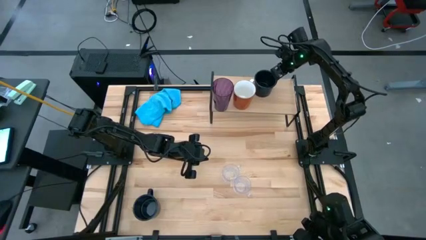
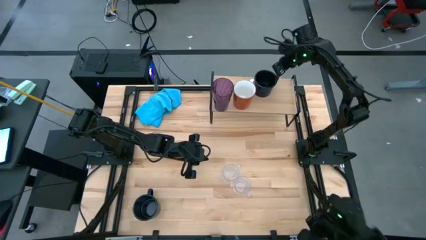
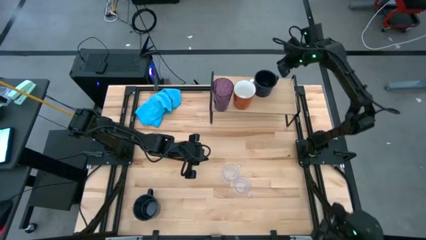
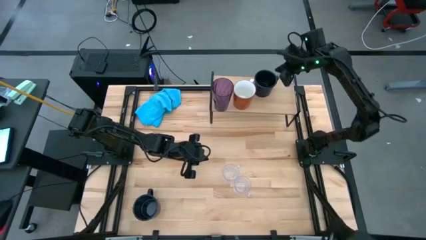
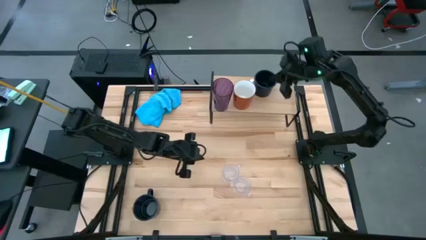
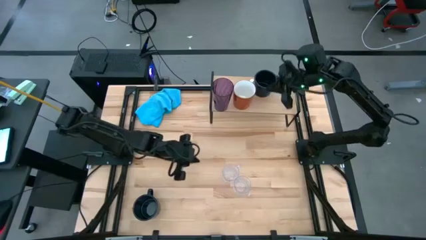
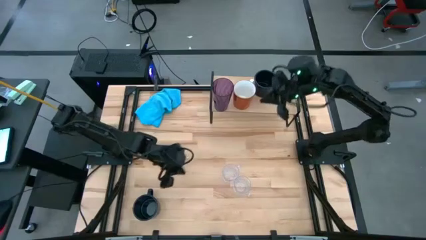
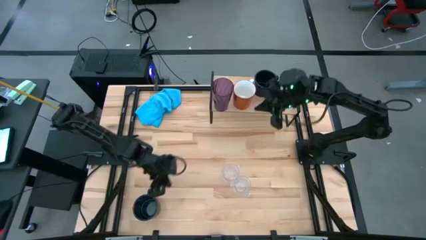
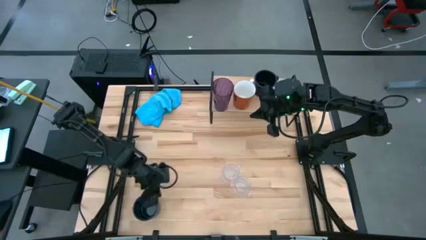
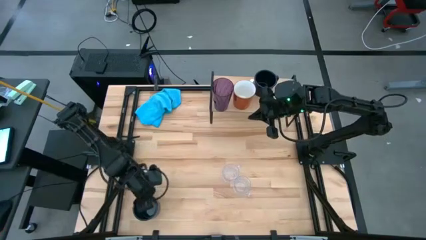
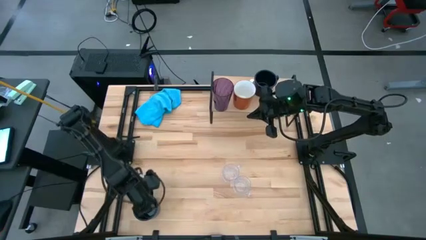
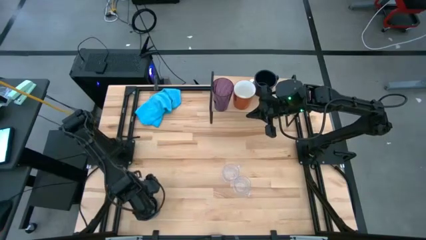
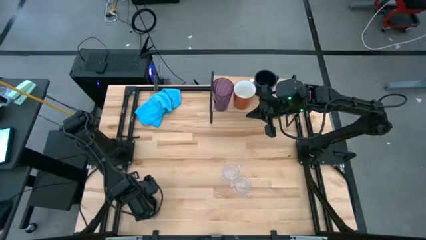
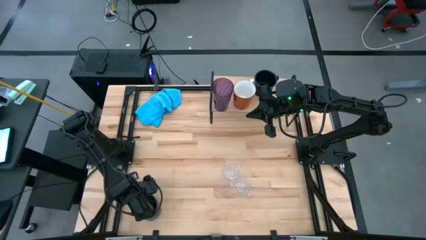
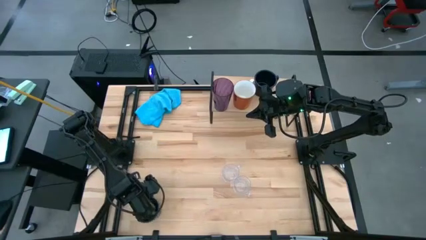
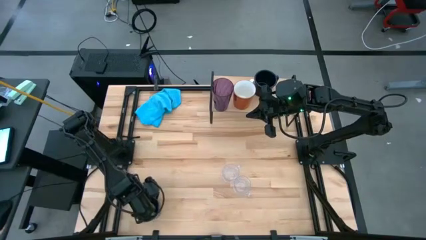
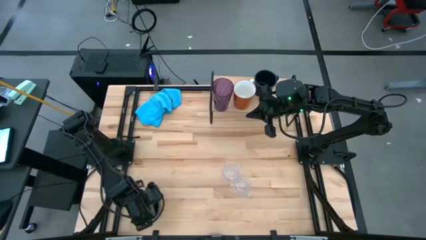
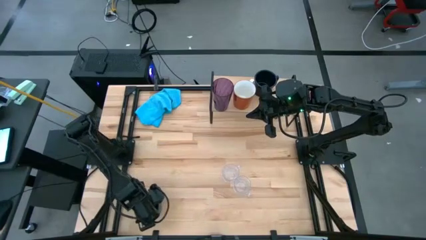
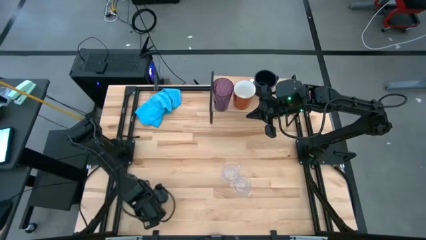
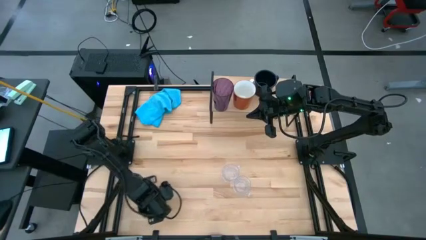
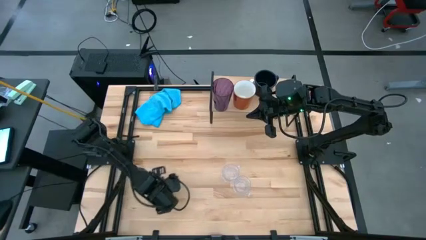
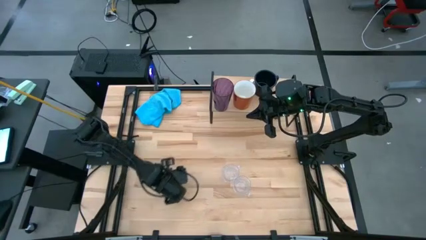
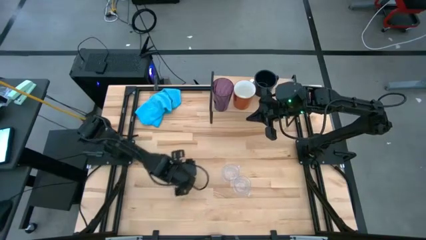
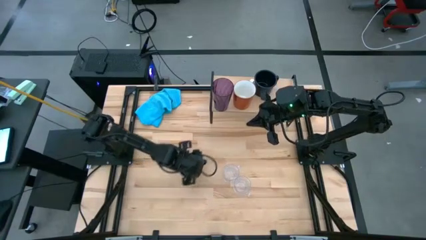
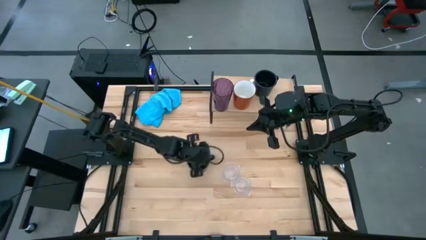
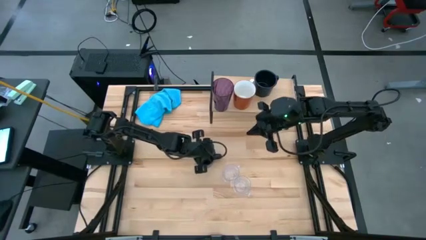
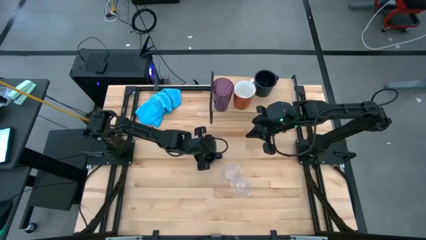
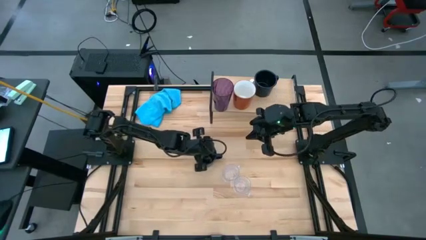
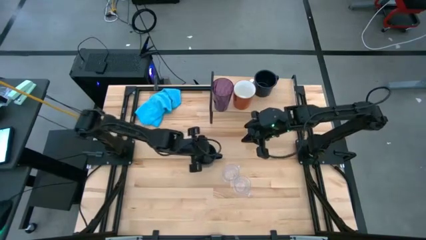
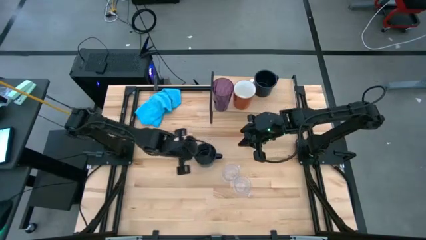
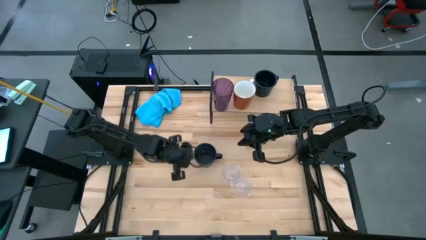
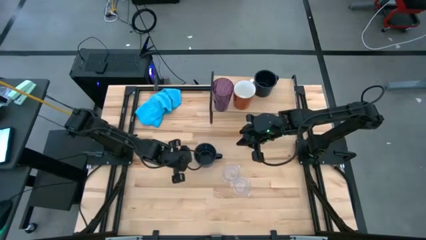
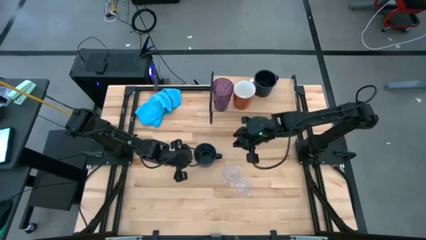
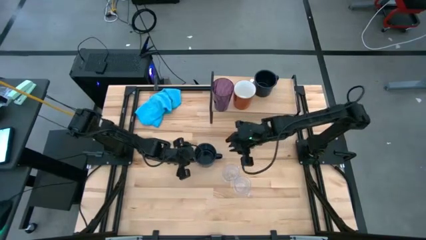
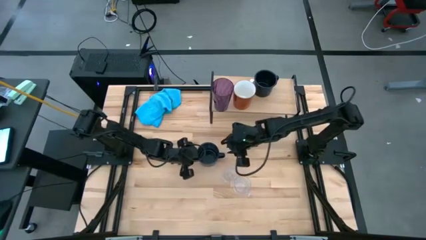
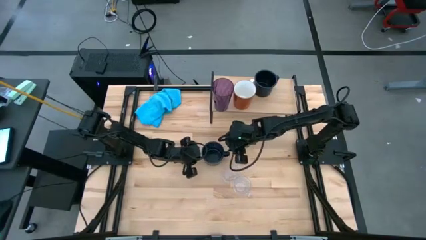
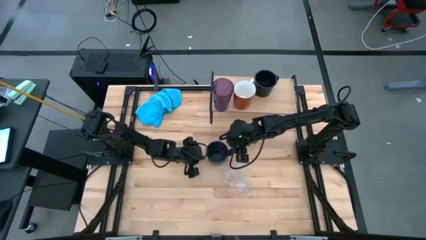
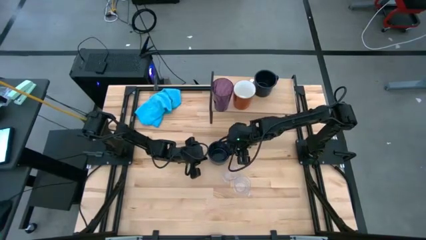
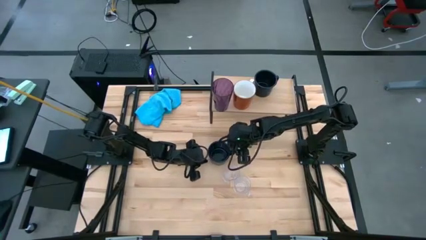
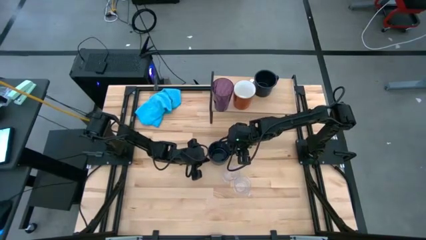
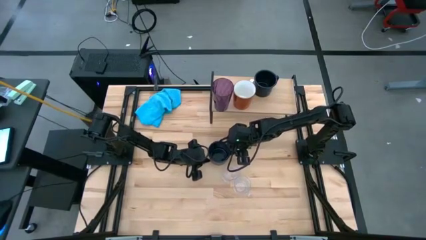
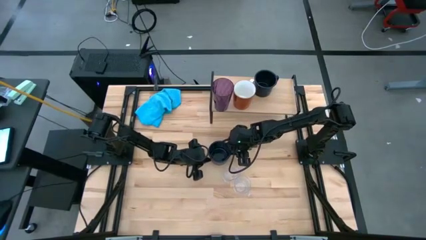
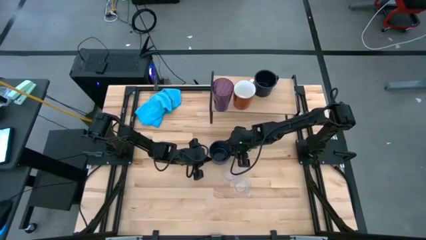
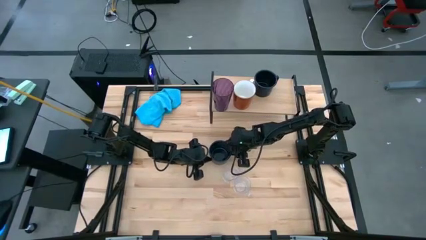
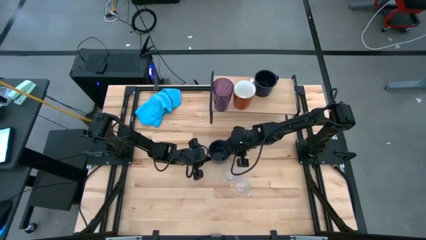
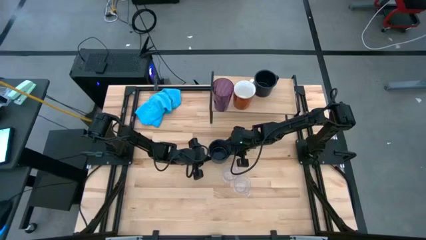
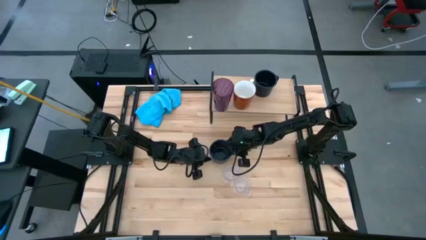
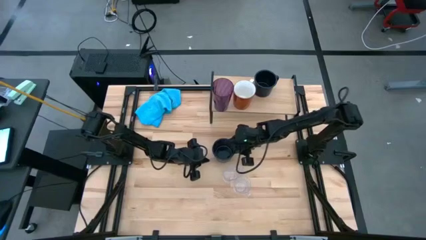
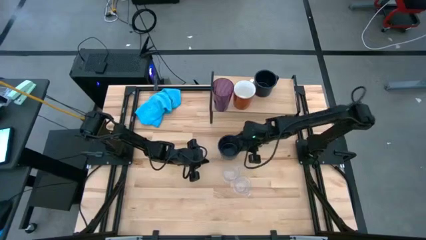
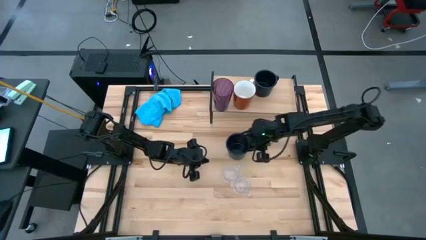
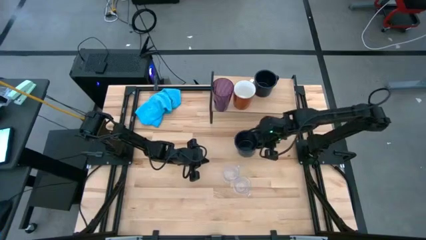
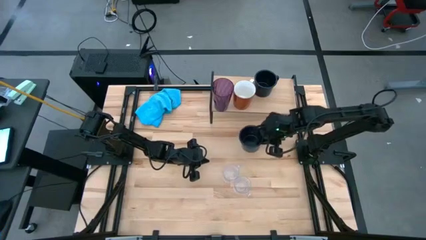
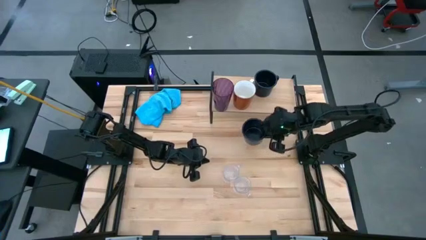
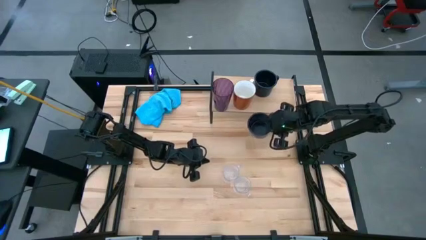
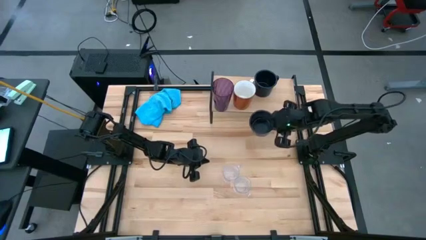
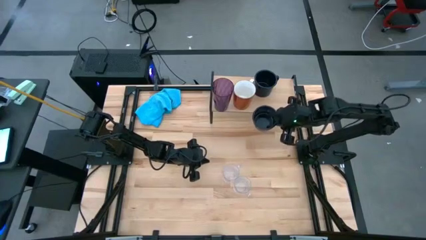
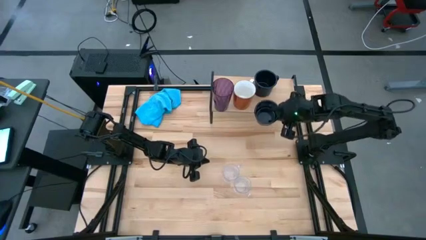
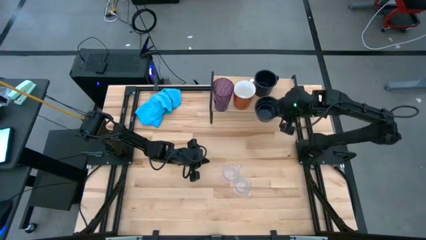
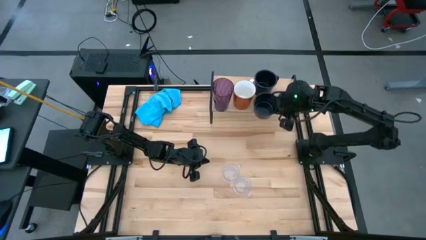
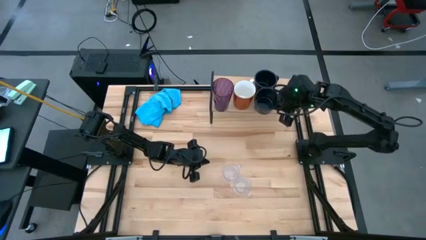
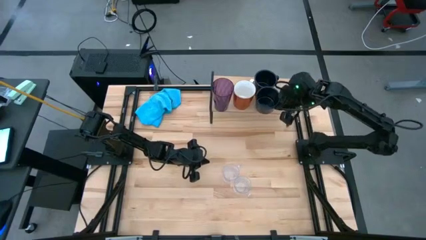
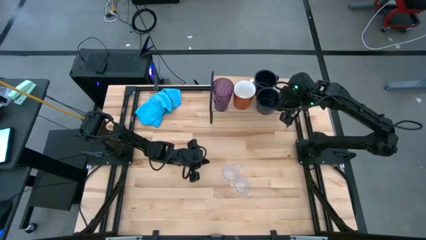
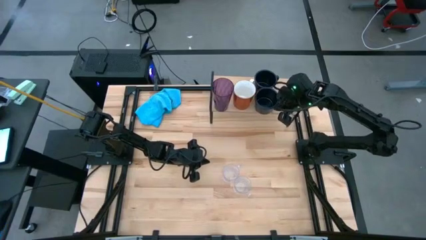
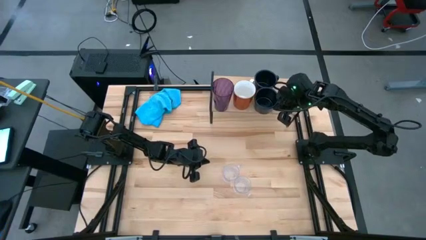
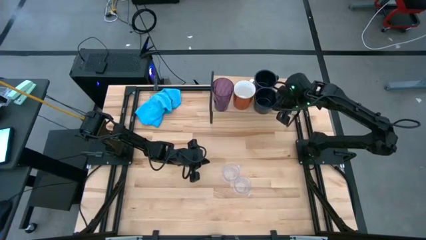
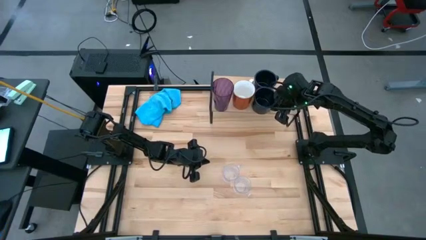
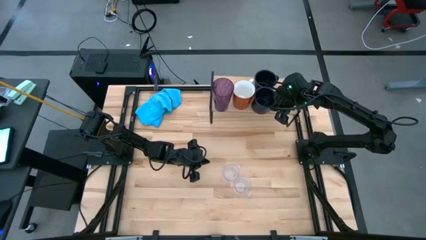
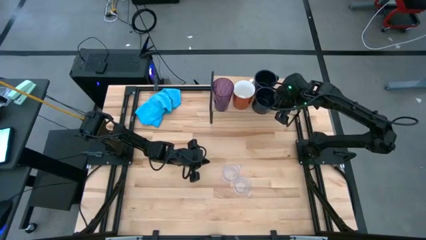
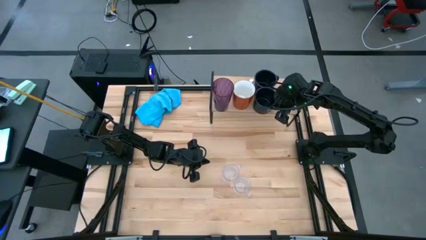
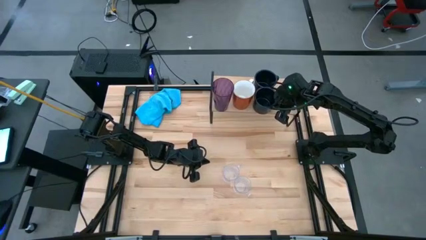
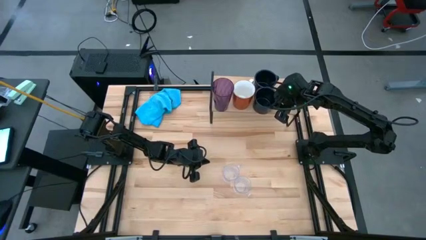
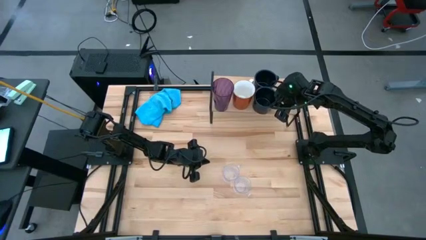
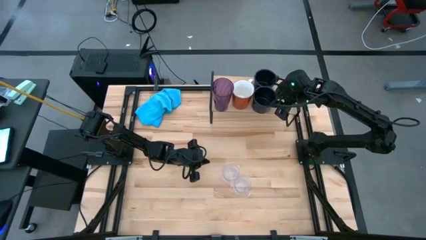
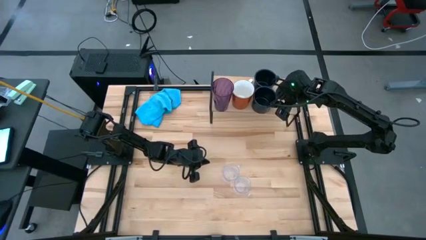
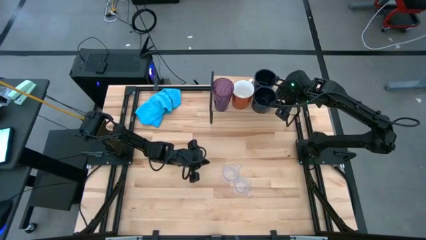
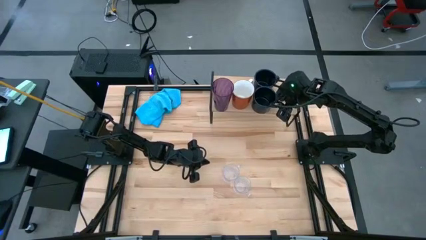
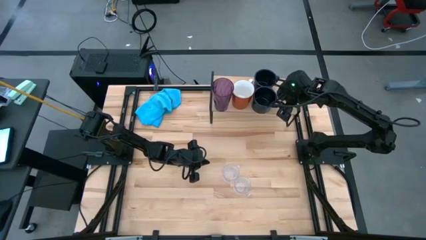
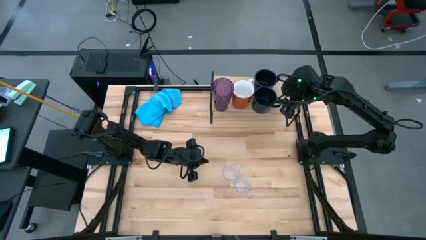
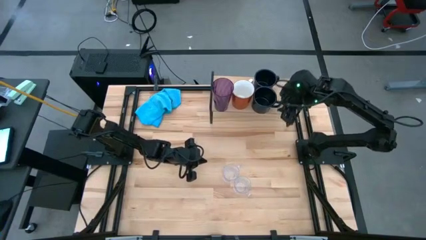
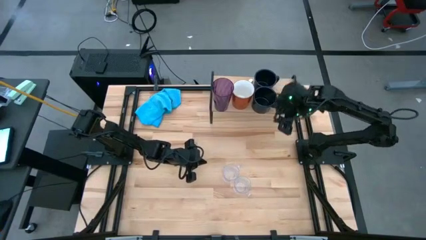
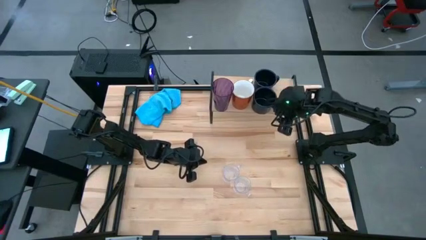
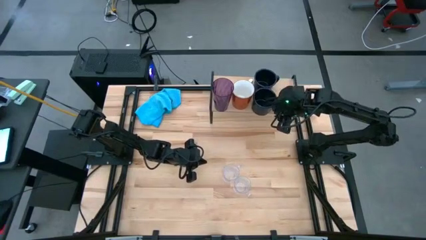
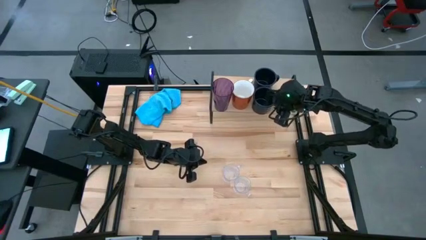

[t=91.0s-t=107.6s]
Task: Stack small to large cups/mugs on shelf
Put the black mug on the shelf aligned with the other black mug
